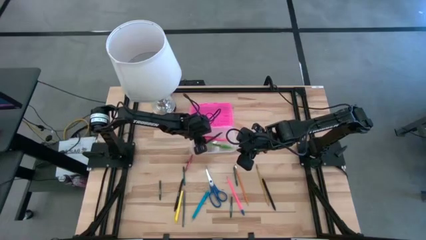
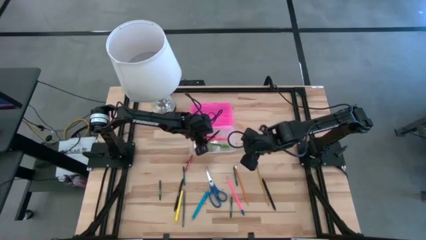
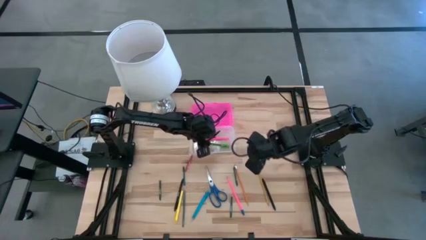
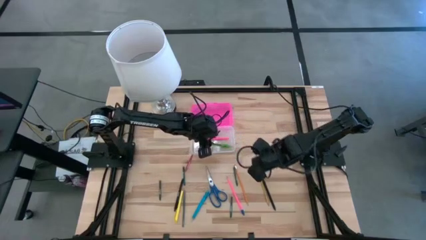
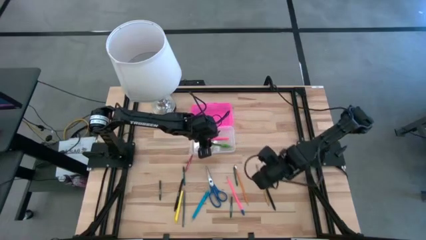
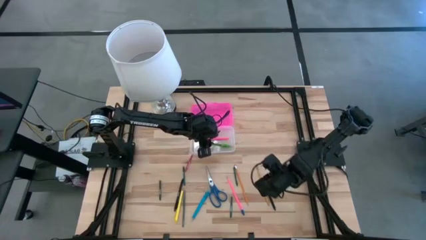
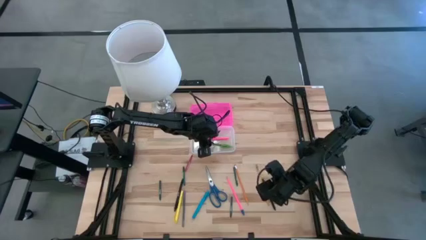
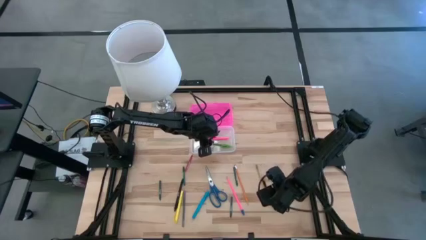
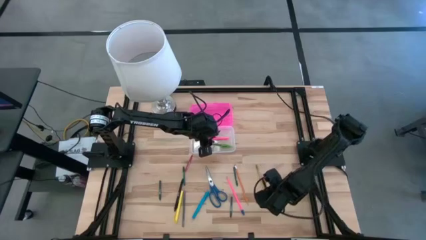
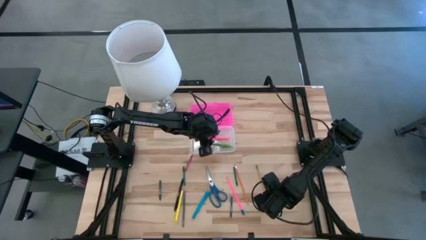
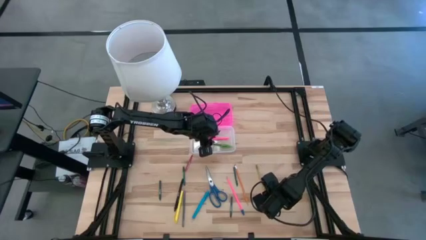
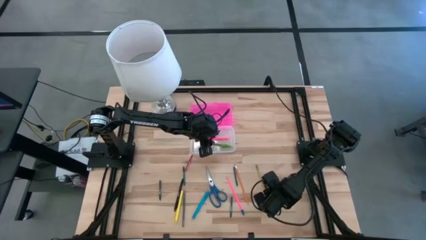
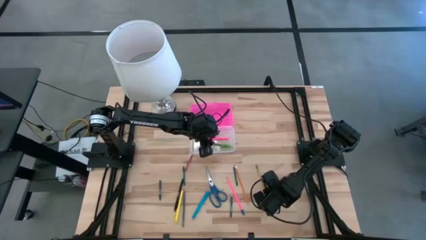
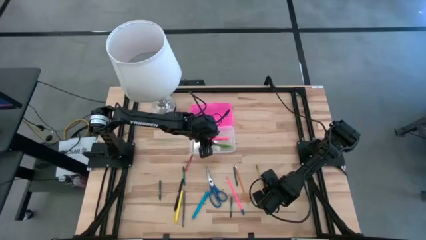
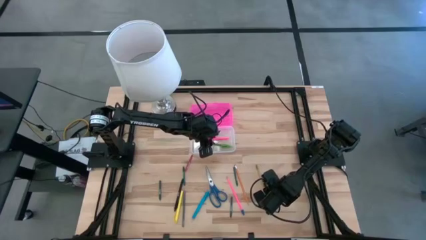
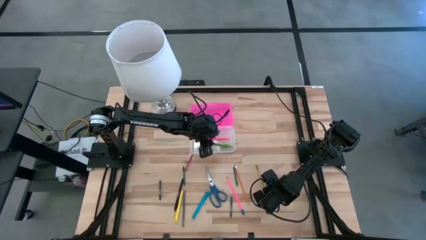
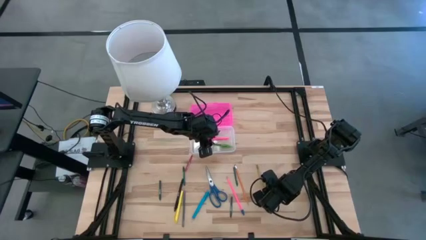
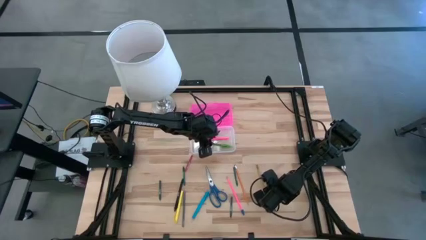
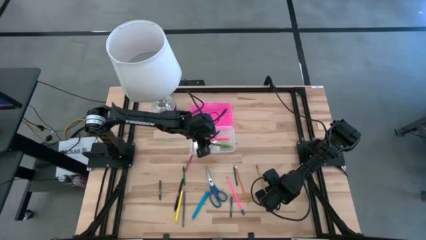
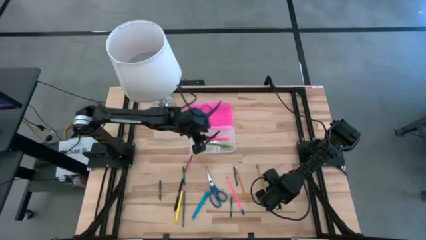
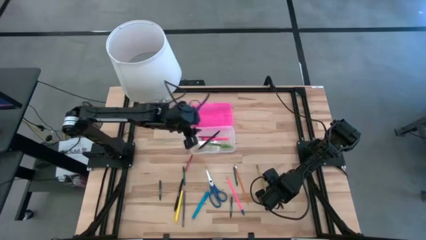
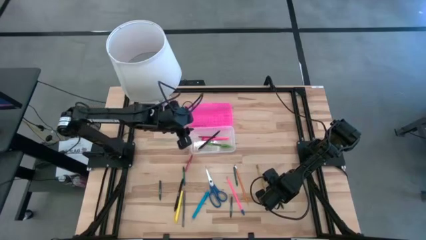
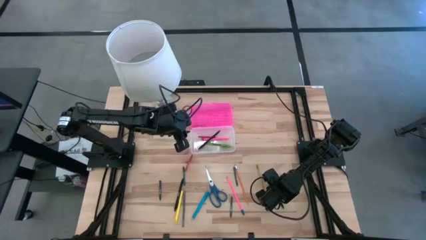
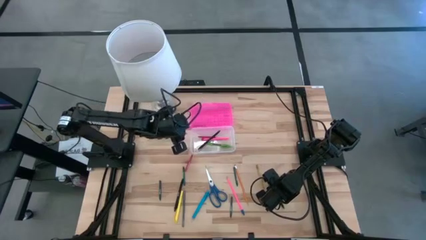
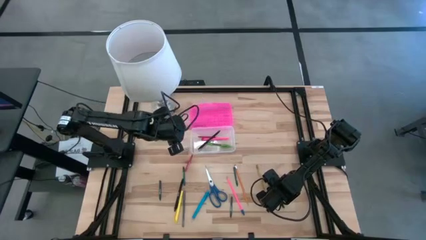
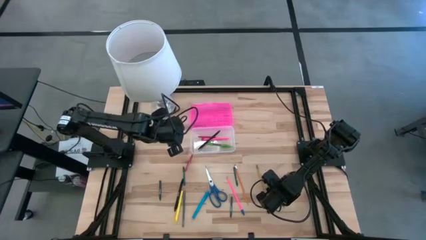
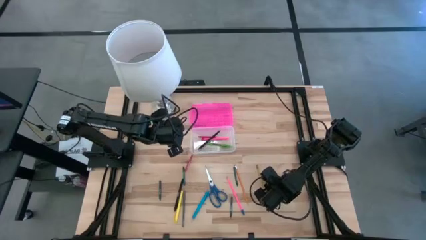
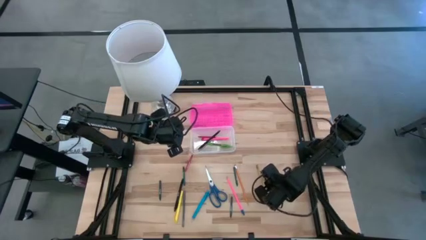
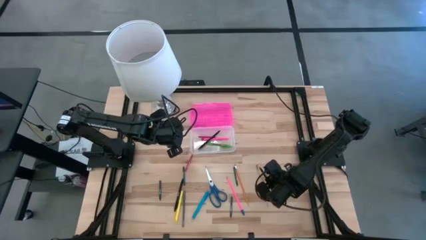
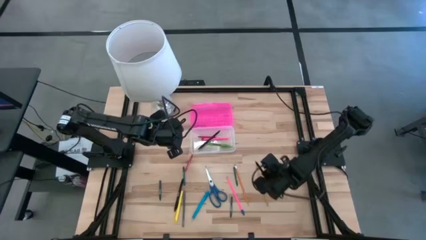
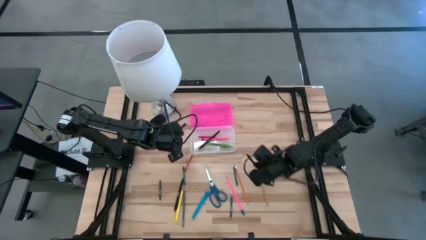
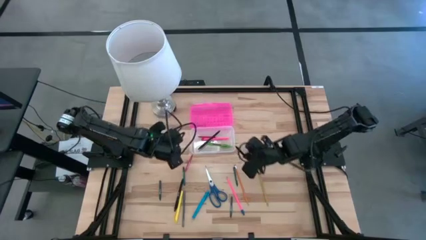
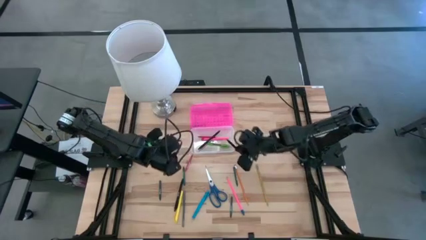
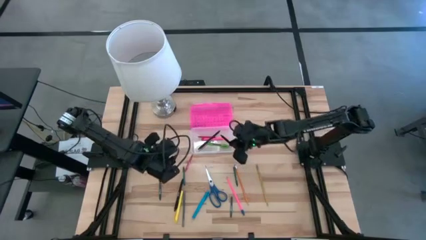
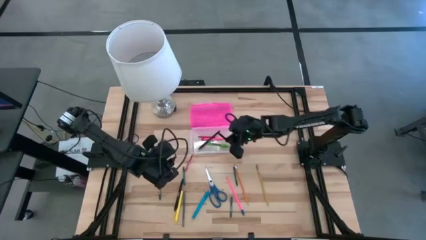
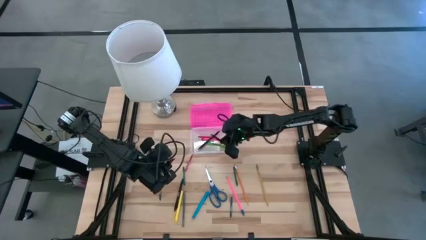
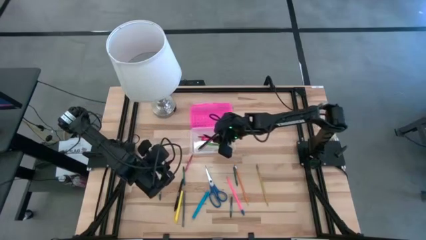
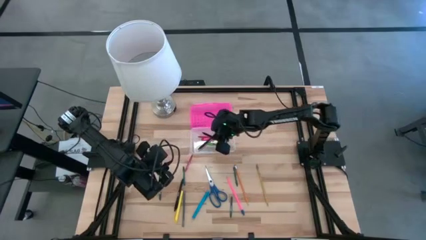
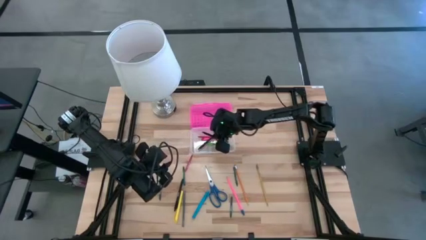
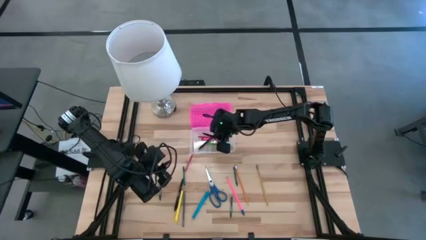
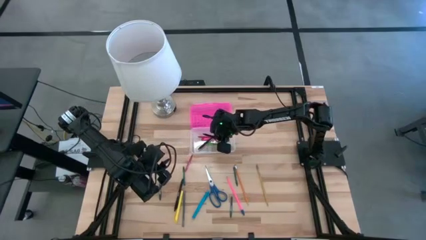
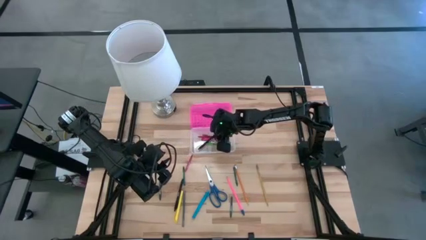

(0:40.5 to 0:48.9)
Task: Pick & place school supplies into a supply box
Put the right black pen into the supply box

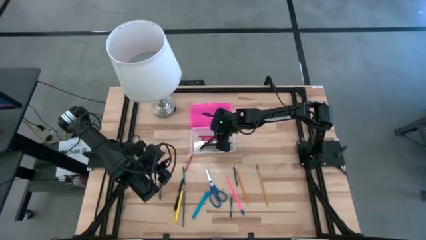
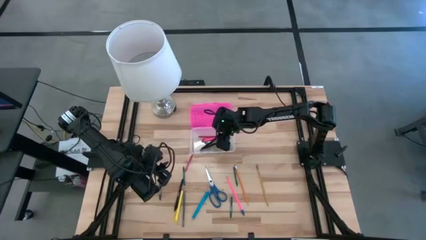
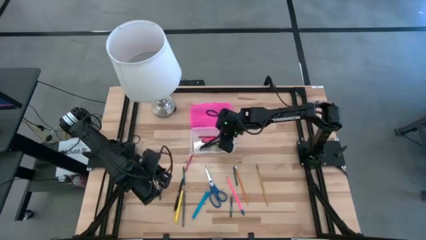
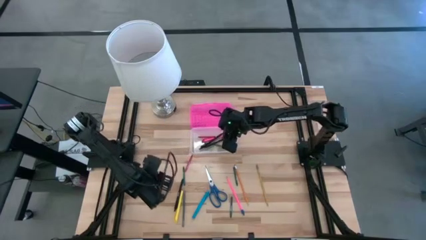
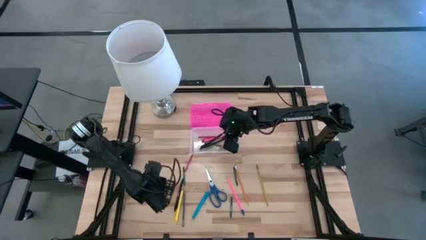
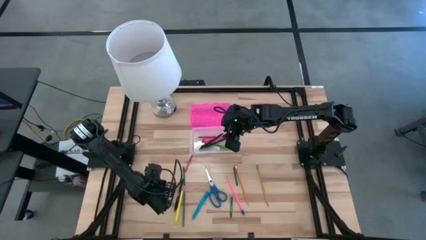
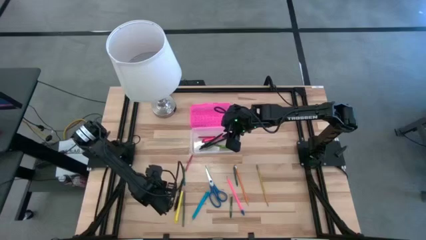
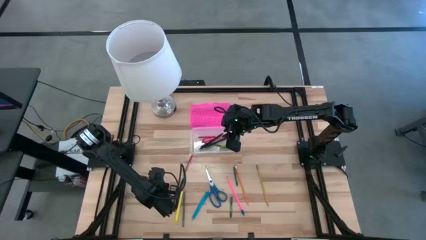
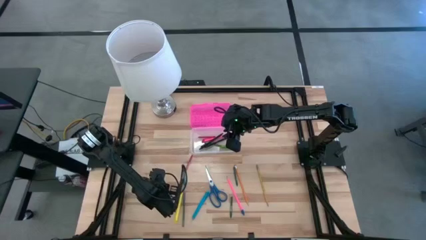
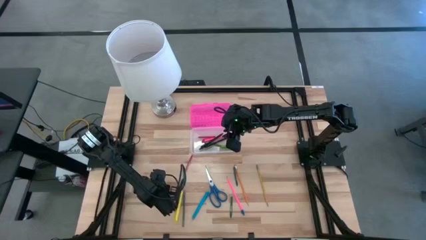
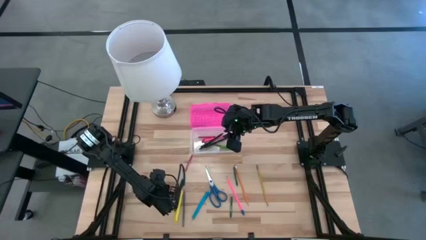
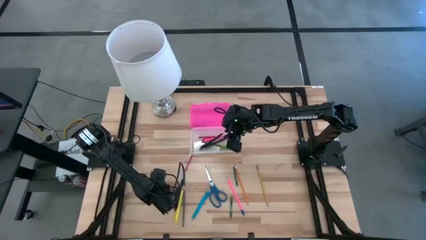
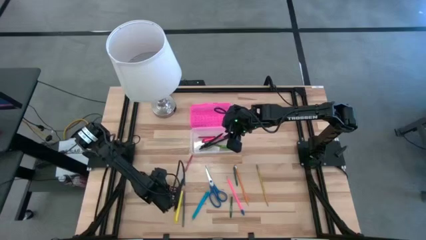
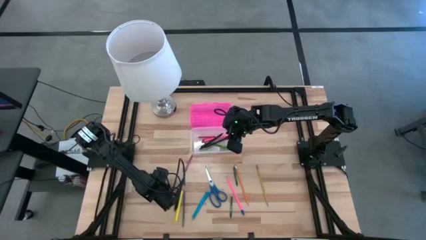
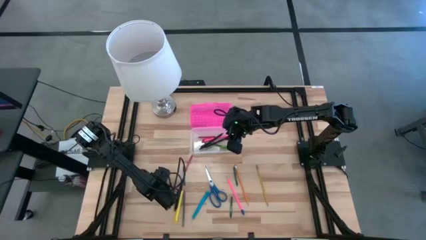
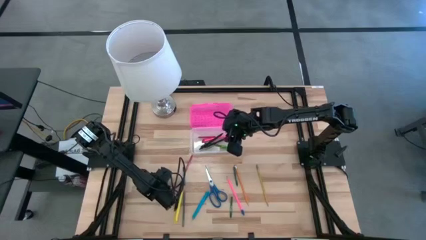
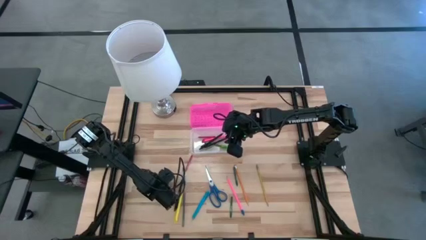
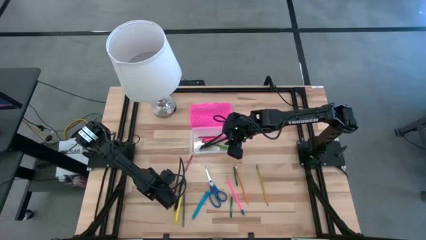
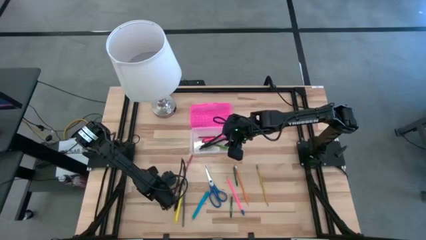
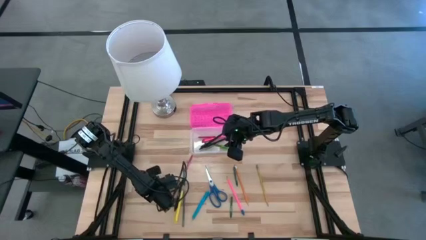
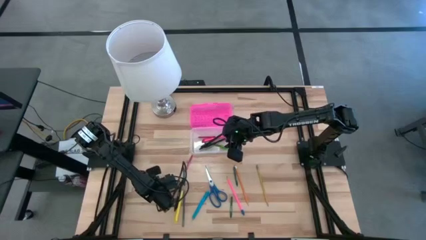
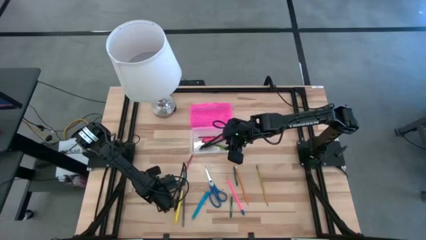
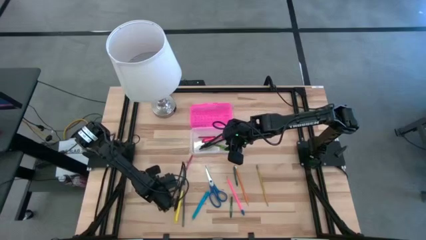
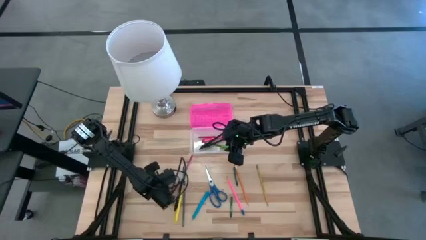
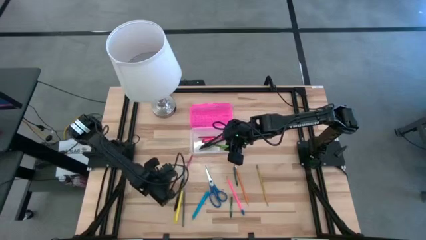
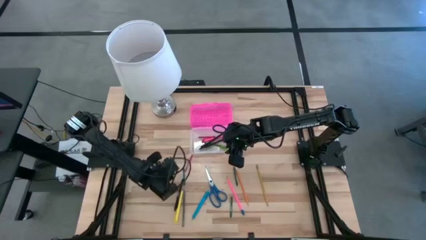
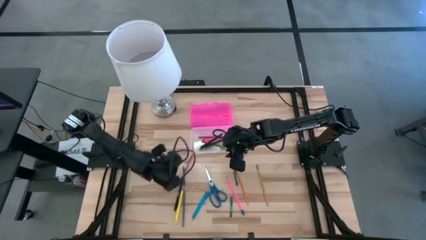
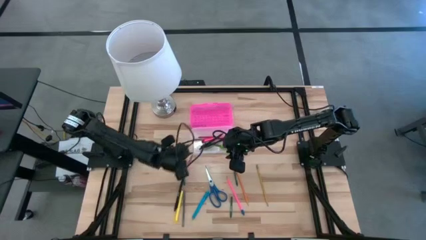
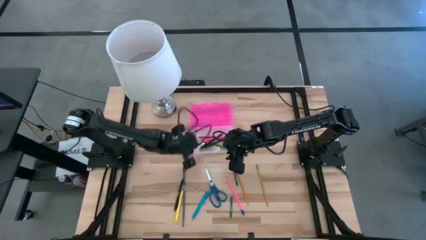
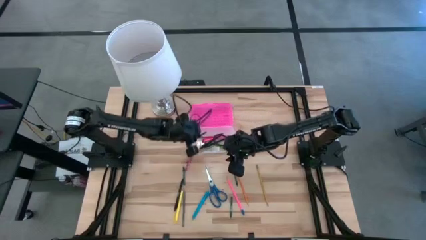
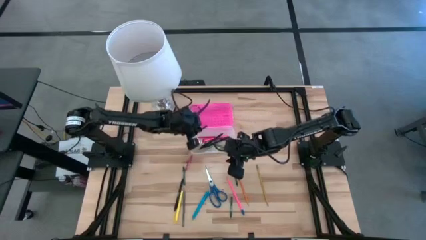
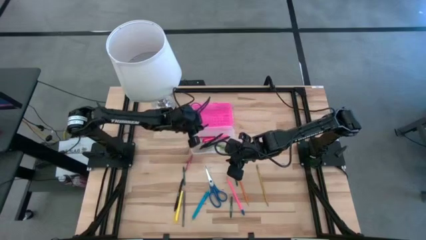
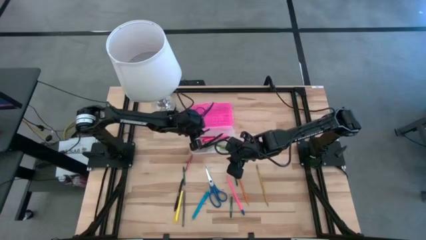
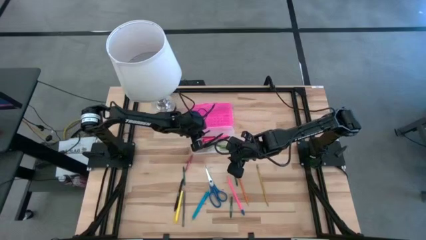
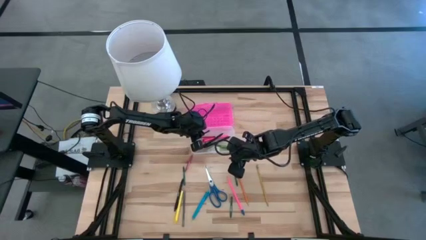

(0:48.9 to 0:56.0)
Put the green crayon into the supply box

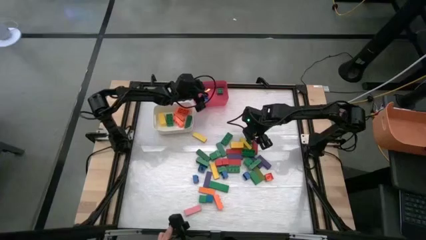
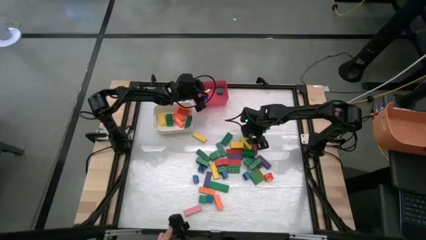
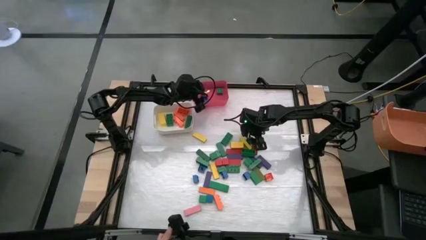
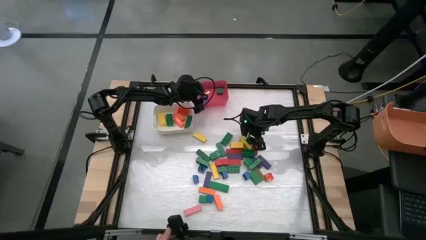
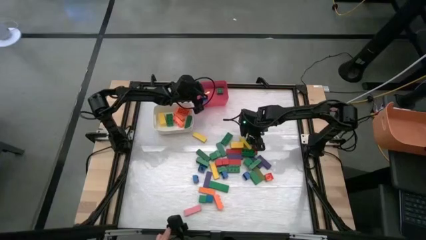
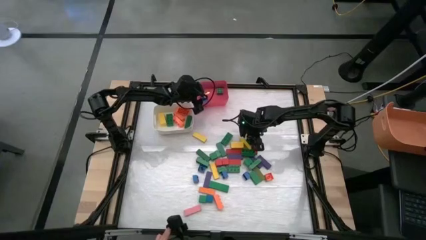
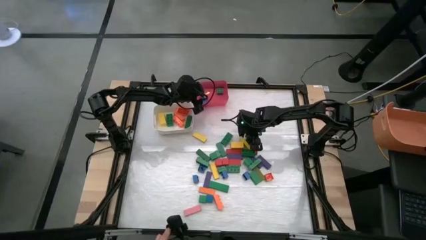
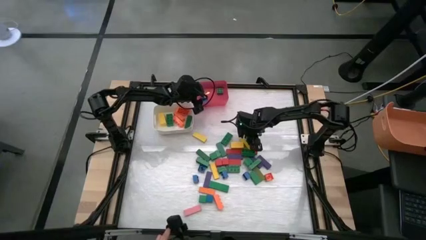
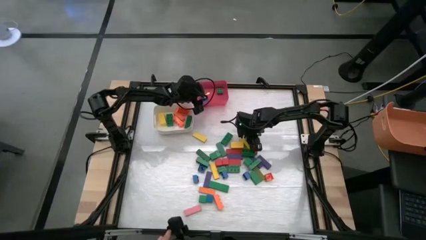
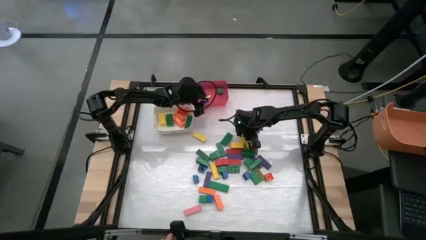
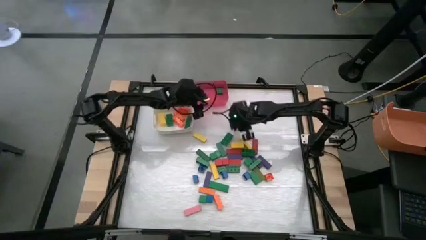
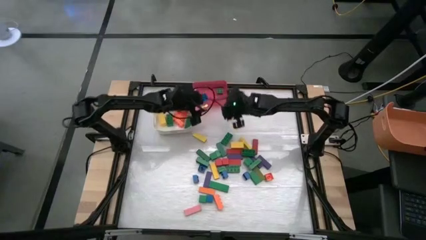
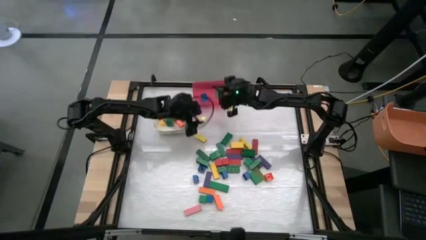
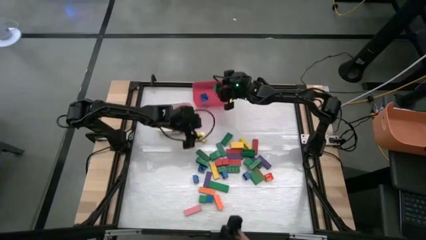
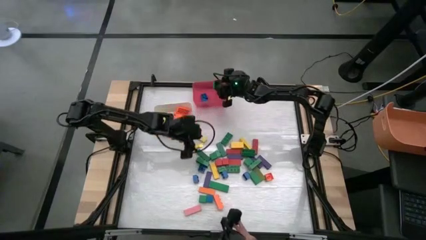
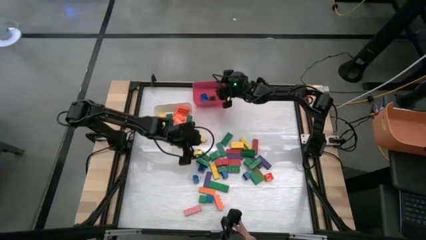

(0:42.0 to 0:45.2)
Task: Sort blocks by size
Put the small green game piece into the red bin
